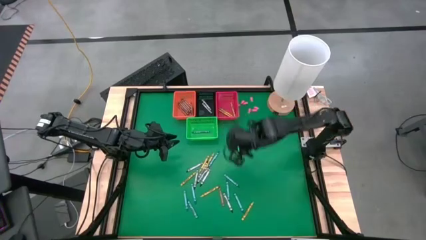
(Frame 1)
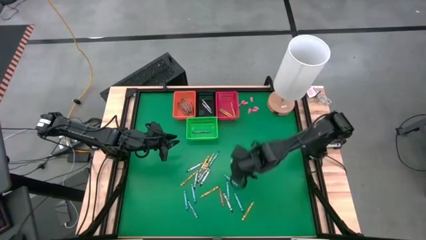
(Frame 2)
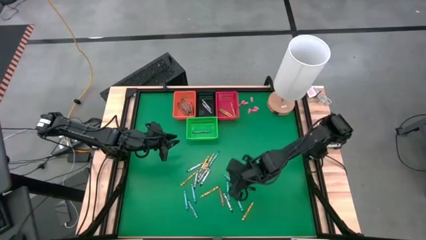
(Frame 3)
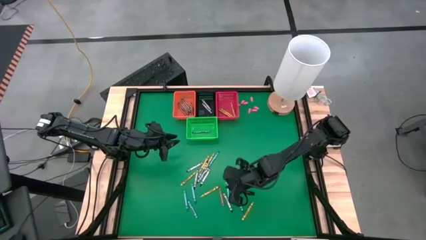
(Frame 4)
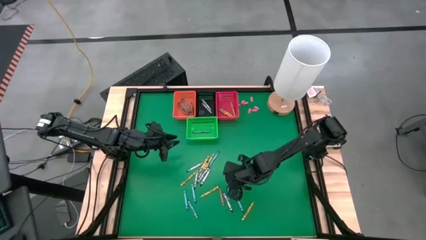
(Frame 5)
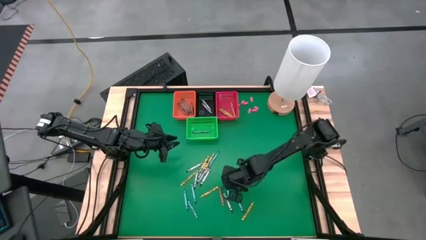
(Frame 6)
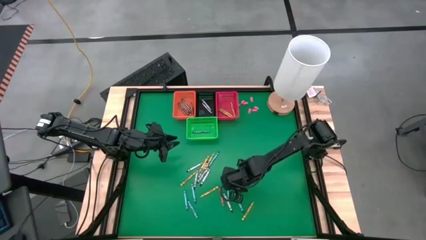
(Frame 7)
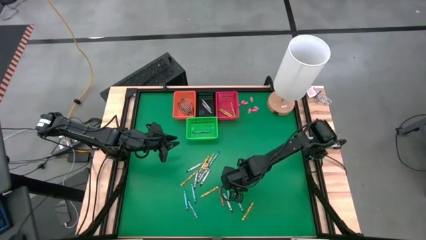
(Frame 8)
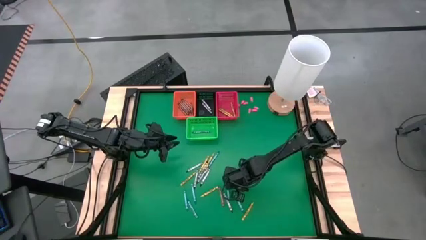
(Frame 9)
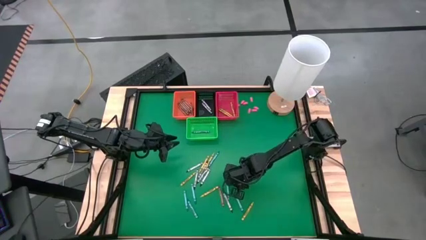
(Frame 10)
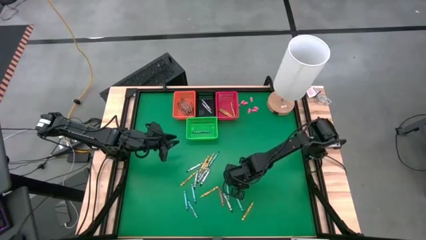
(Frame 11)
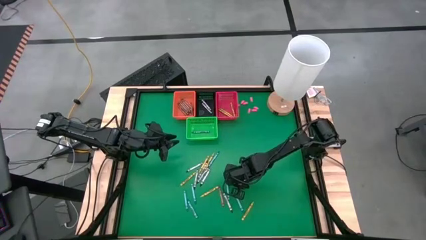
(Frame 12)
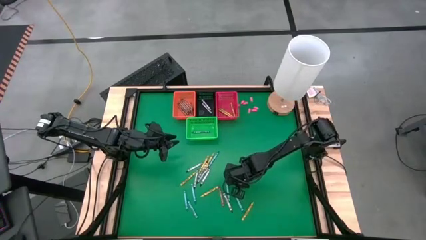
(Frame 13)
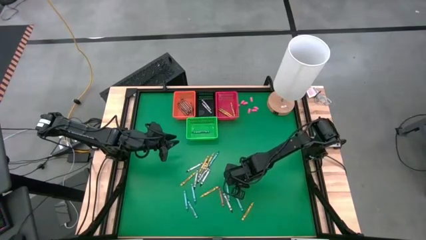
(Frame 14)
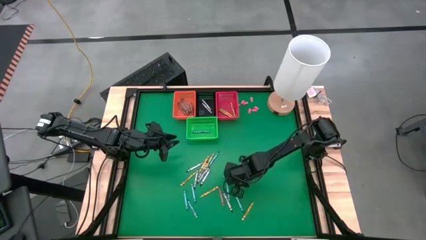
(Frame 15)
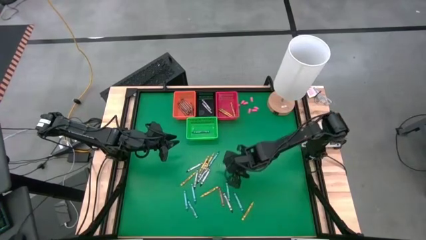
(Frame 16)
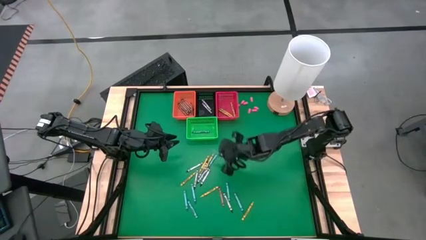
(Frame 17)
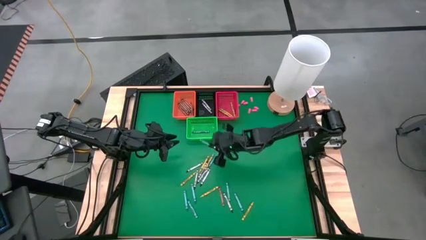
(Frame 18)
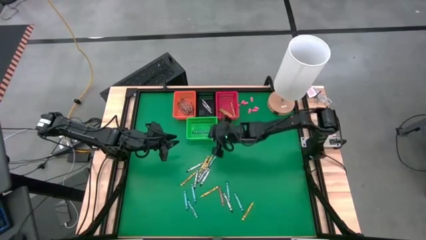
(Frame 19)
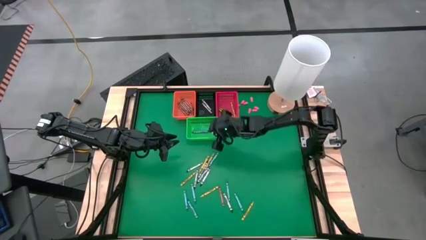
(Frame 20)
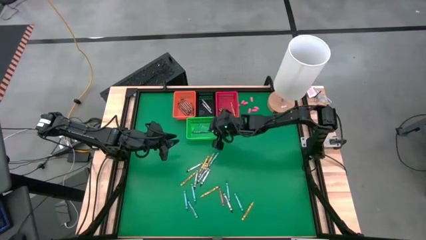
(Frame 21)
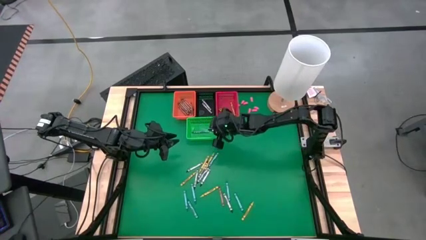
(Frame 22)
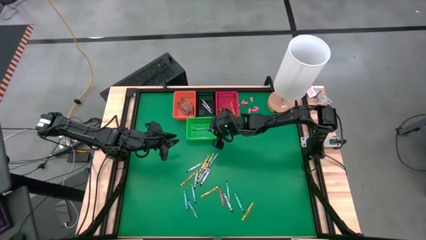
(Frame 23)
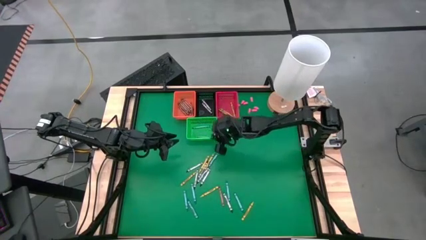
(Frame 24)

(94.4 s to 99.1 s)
Task: Sort crayons
Put a blue crayon in the green basket

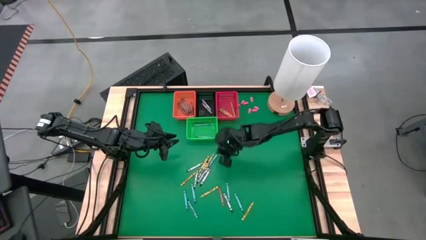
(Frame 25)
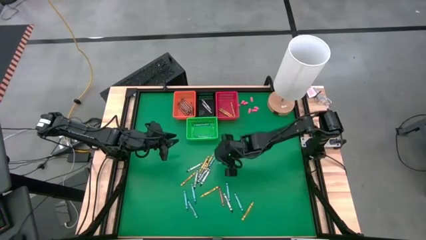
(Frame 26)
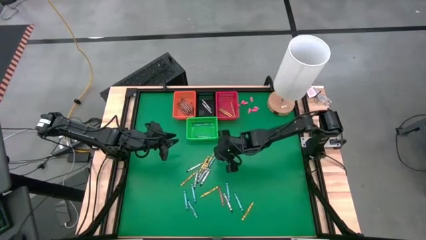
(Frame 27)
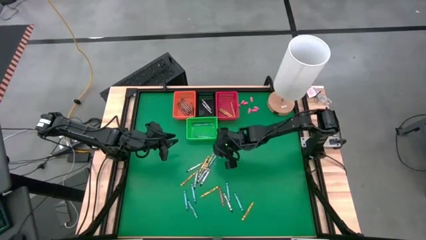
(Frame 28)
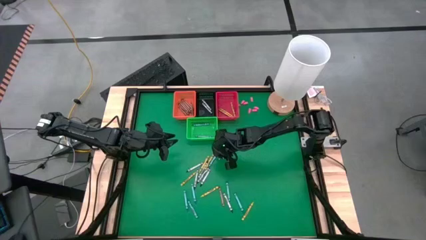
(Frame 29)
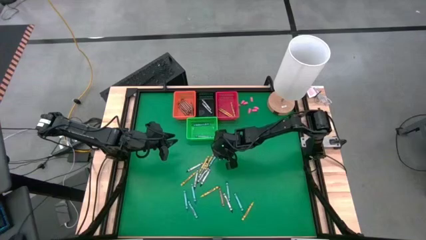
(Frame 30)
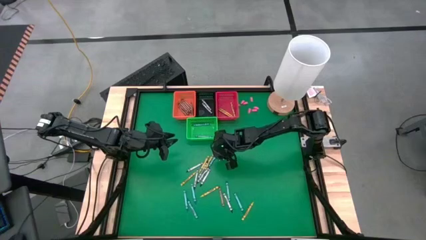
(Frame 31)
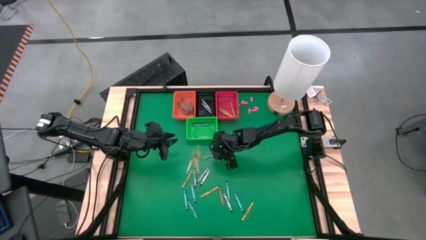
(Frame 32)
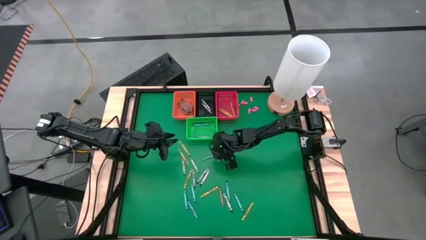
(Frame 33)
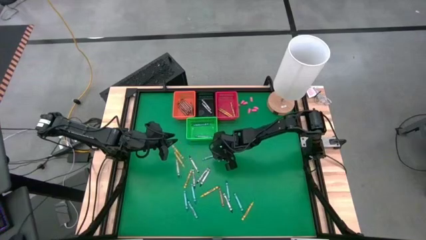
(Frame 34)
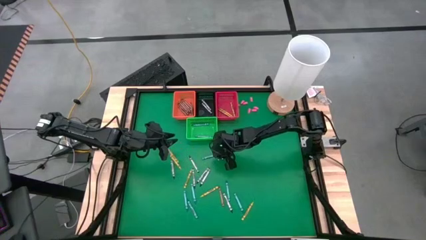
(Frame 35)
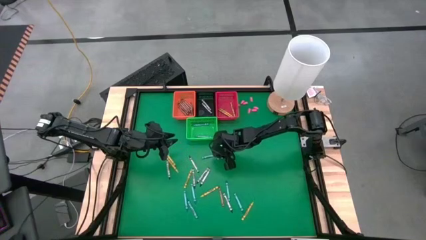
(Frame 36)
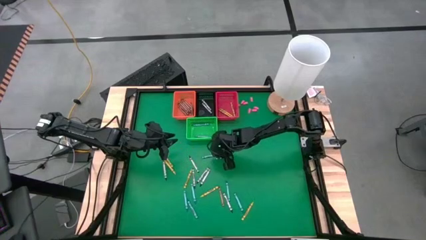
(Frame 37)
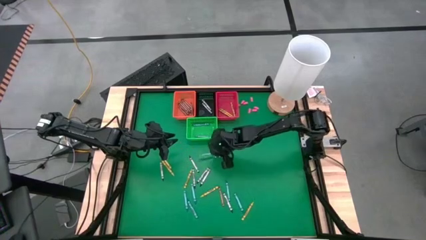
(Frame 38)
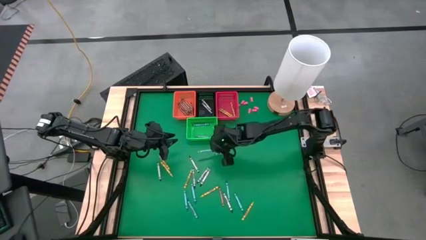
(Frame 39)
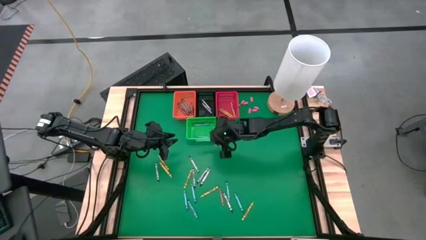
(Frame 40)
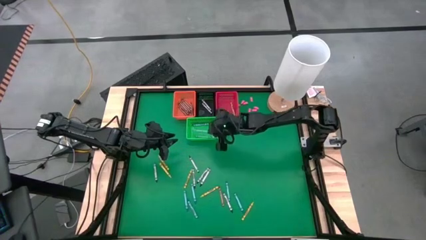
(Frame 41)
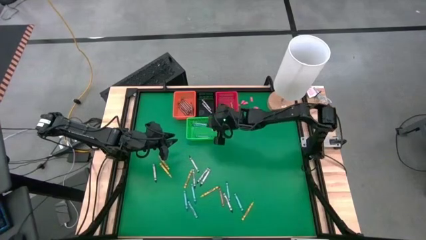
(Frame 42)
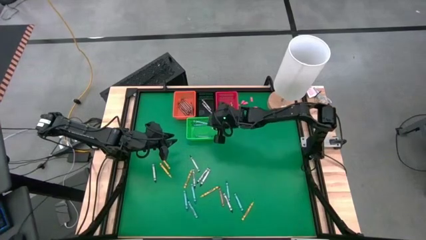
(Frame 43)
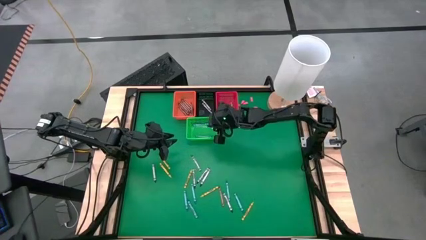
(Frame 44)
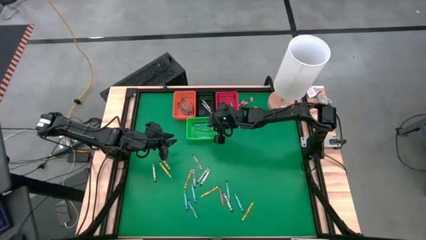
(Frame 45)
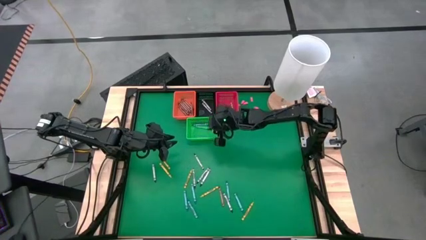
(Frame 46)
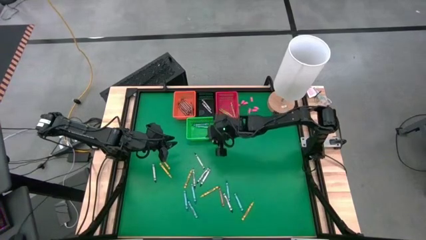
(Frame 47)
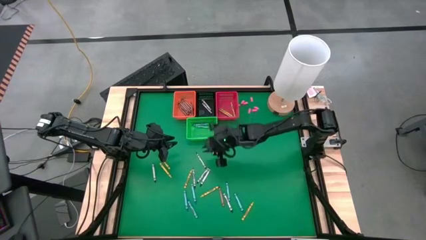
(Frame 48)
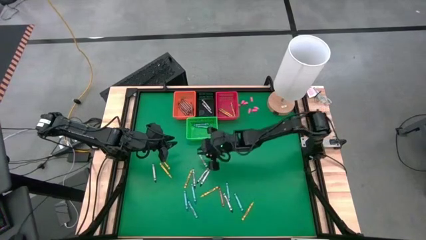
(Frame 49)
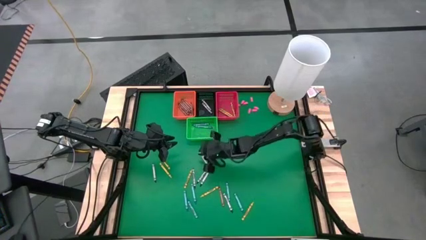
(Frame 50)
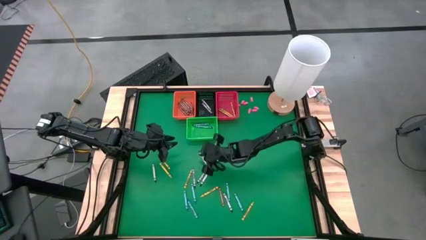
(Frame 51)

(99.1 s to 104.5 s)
Put a blue crayon in the green basket

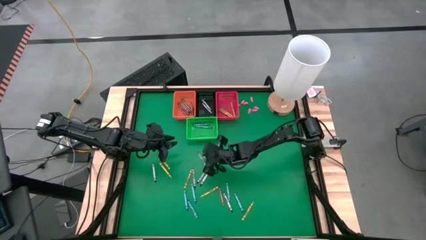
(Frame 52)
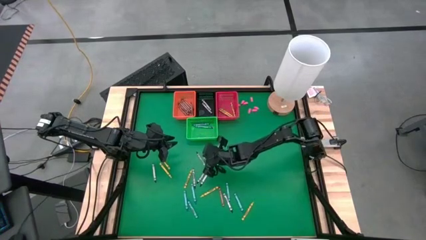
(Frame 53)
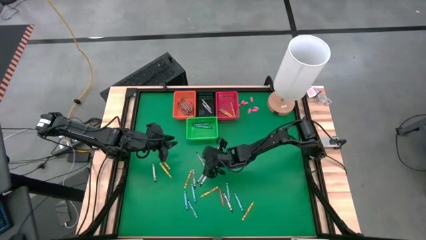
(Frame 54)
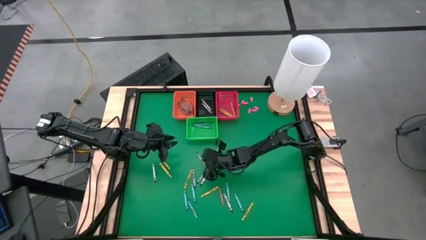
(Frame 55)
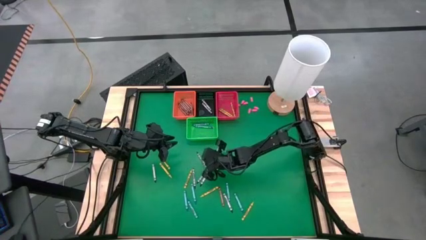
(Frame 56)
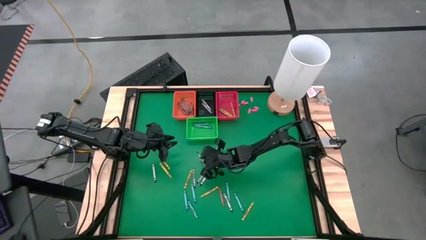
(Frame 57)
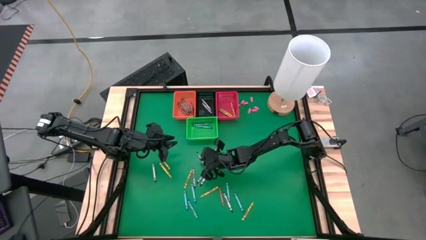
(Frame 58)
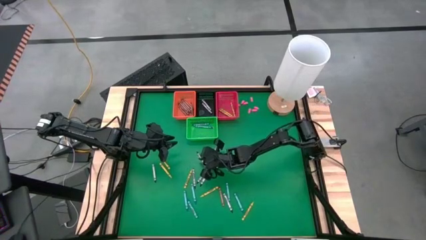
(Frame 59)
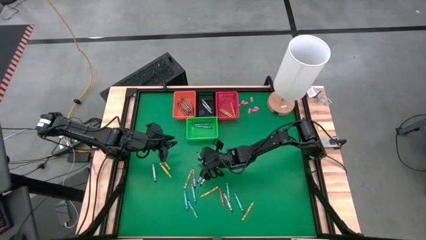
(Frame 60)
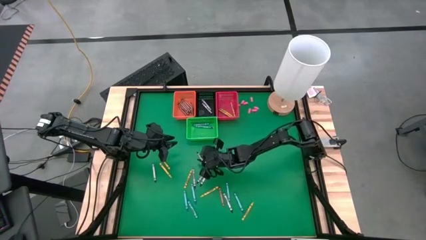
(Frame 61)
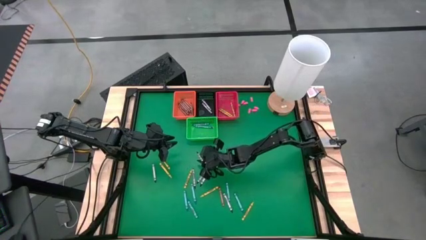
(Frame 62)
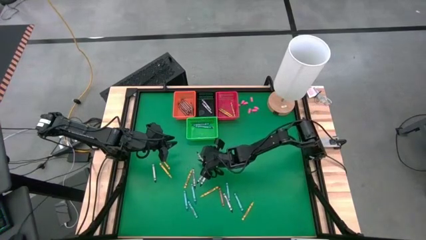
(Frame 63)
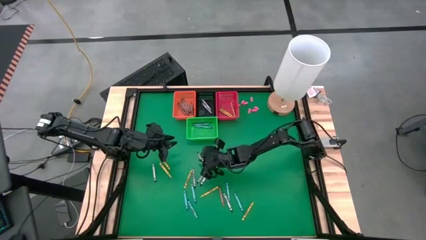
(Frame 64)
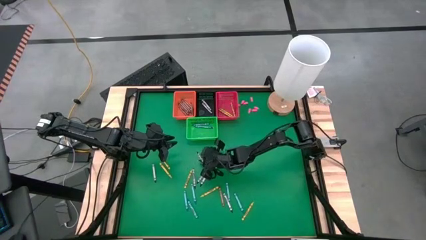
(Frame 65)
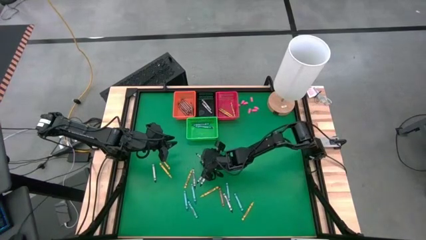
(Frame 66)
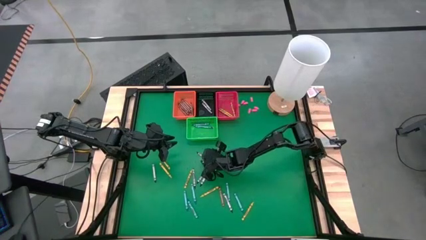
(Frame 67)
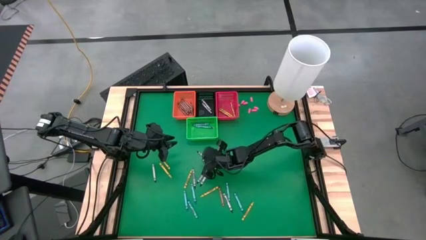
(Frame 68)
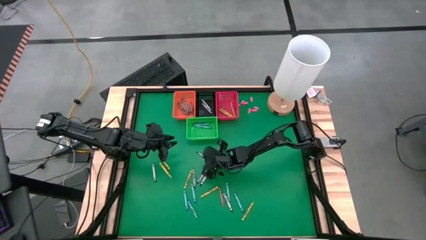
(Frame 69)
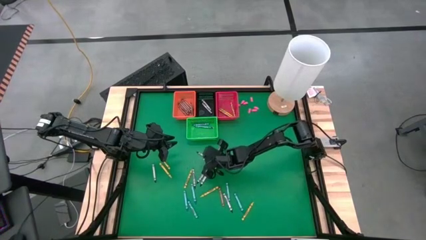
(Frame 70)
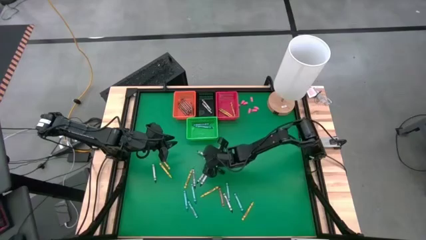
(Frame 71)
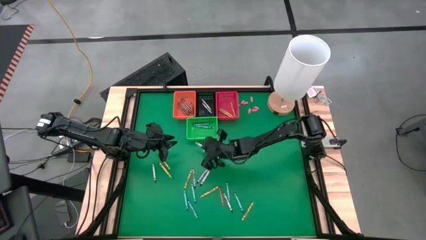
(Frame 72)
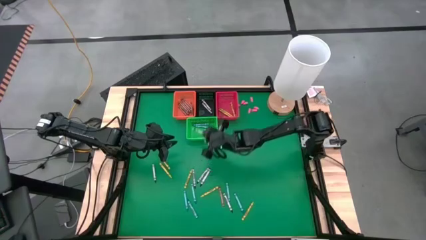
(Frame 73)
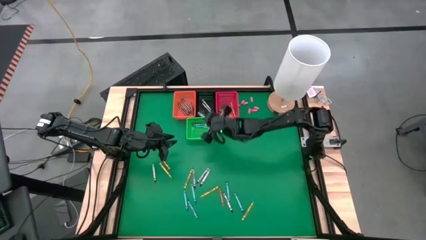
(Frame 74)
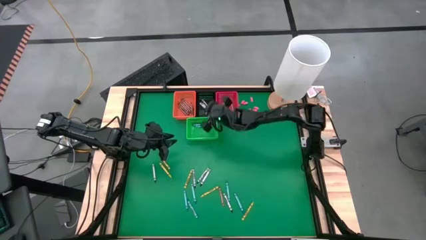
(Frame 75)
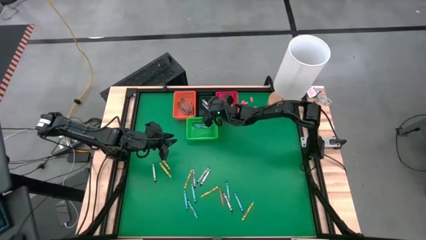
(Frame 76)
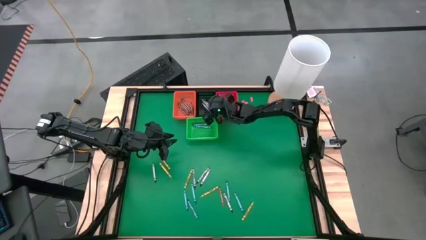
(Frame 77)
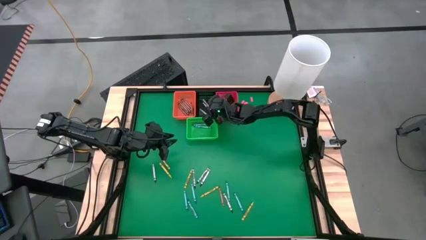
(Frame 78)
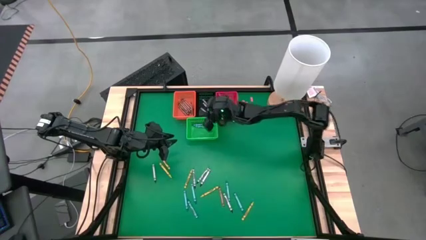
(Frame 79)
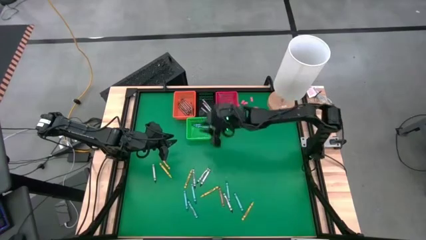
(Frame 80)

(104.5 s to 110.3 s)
Put a black crayon in the black basket
